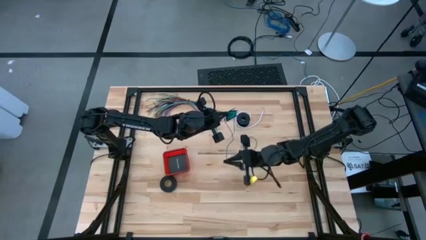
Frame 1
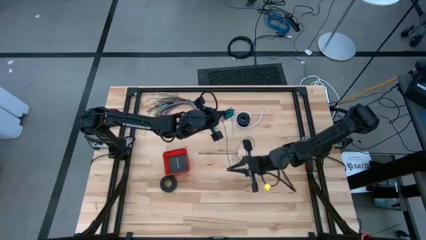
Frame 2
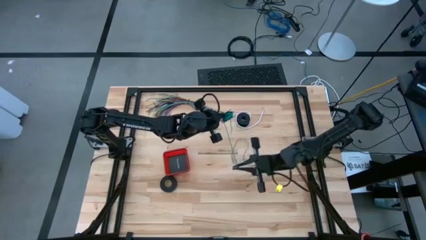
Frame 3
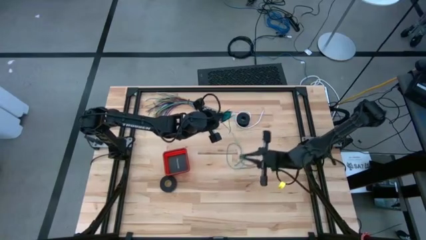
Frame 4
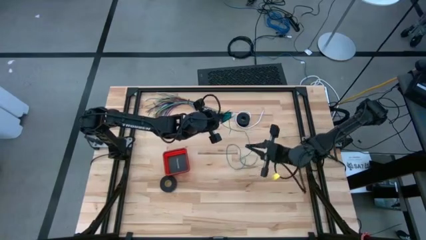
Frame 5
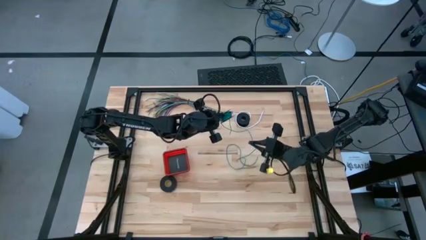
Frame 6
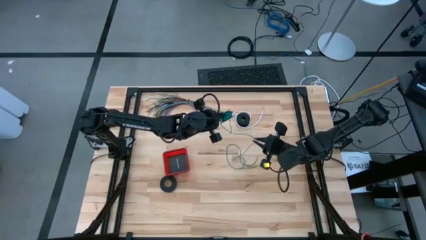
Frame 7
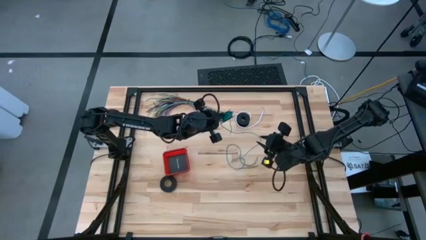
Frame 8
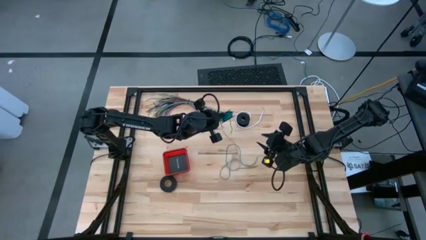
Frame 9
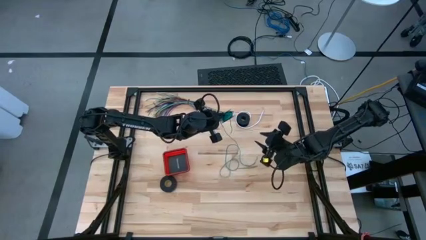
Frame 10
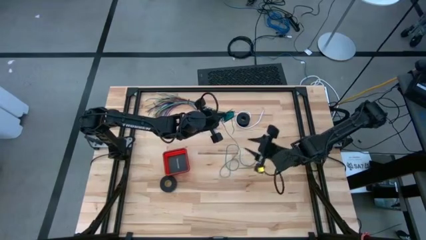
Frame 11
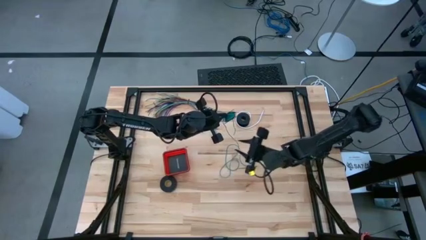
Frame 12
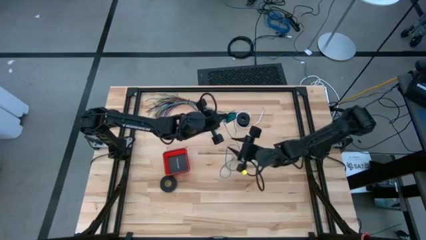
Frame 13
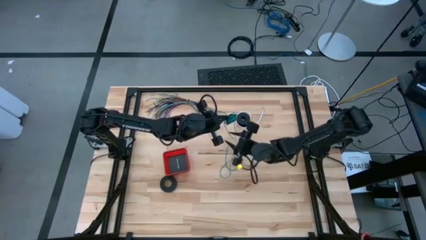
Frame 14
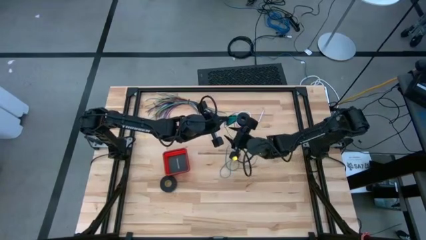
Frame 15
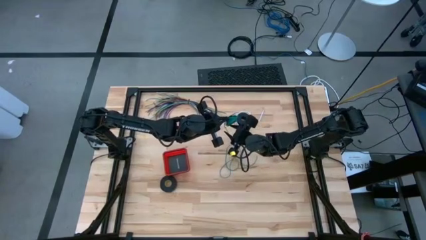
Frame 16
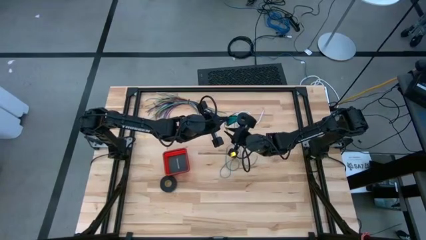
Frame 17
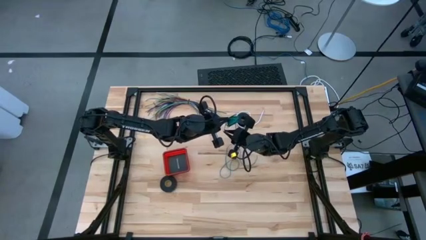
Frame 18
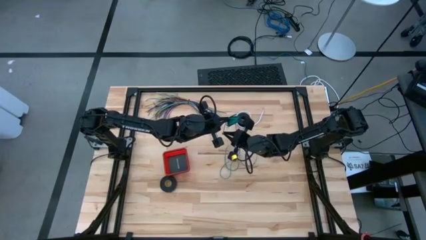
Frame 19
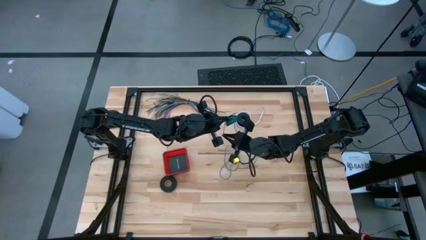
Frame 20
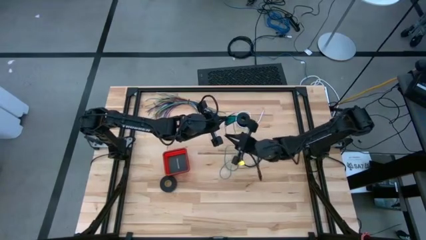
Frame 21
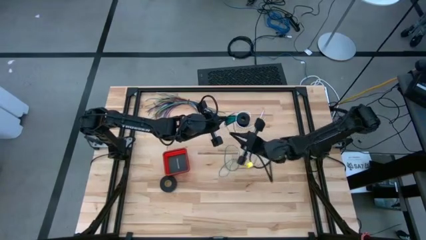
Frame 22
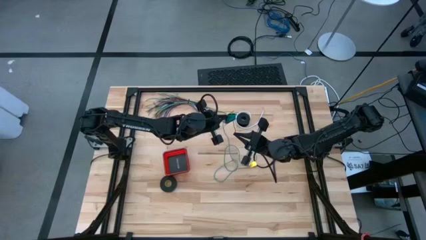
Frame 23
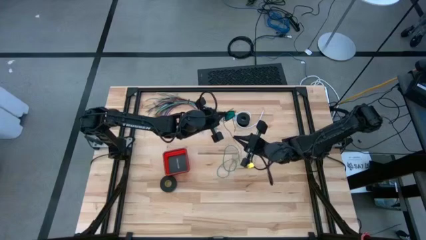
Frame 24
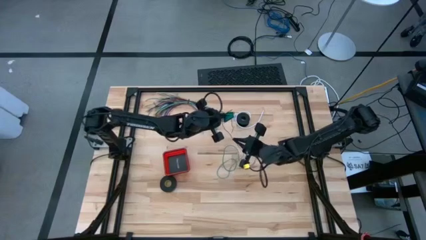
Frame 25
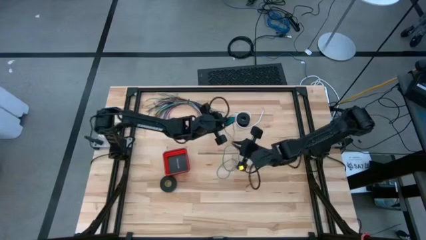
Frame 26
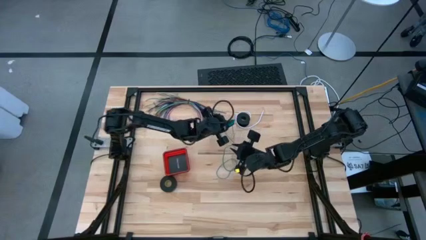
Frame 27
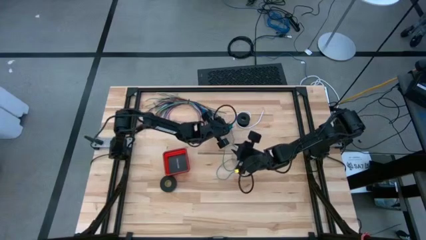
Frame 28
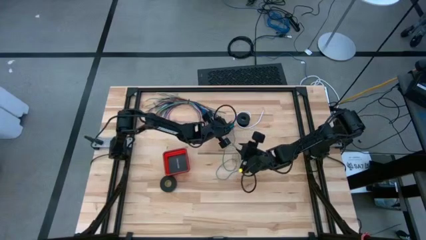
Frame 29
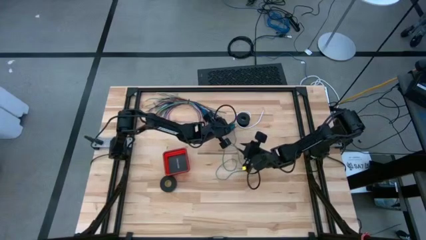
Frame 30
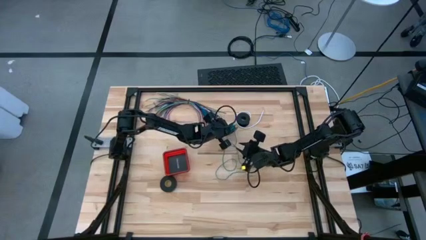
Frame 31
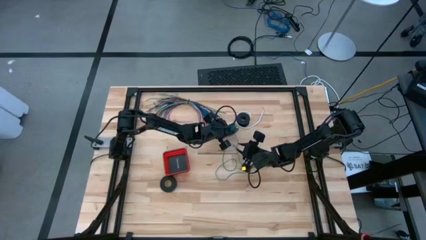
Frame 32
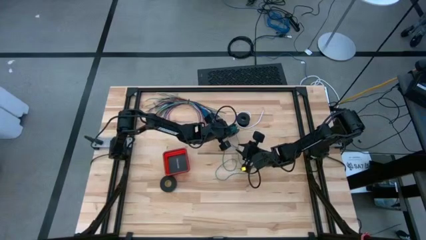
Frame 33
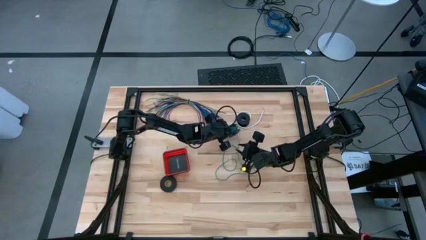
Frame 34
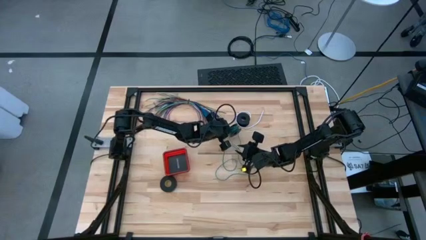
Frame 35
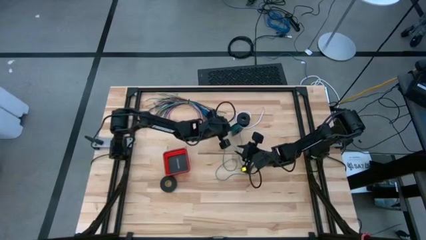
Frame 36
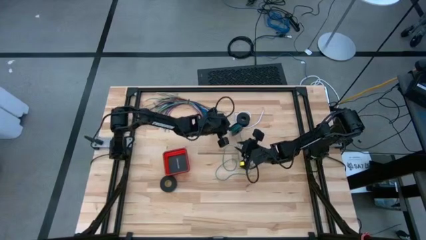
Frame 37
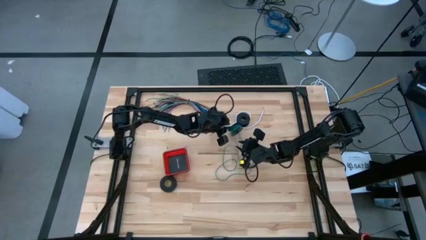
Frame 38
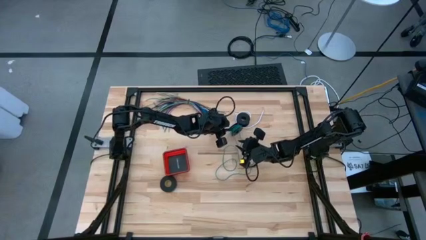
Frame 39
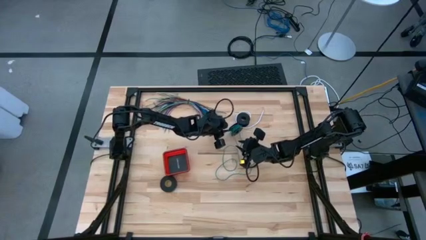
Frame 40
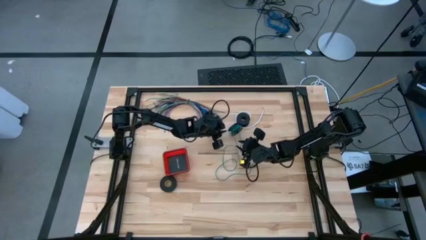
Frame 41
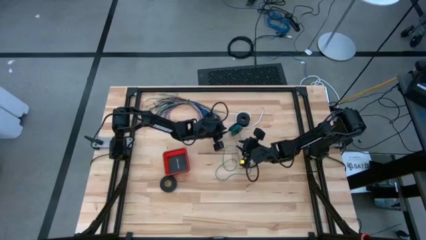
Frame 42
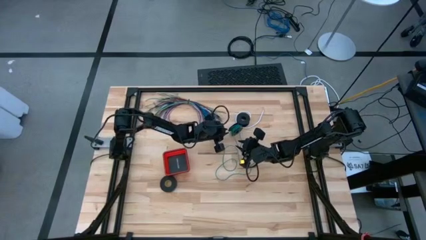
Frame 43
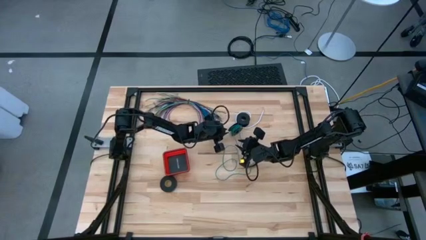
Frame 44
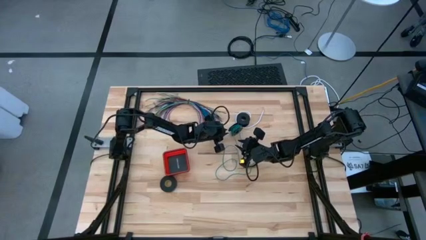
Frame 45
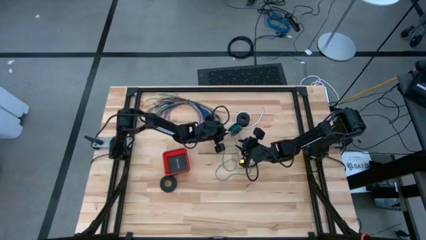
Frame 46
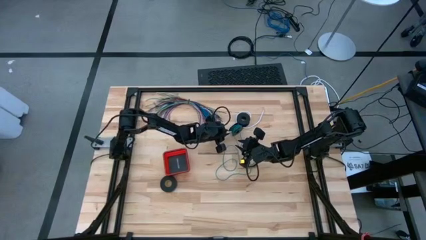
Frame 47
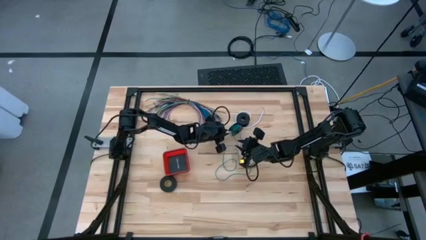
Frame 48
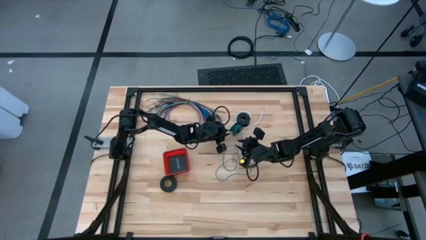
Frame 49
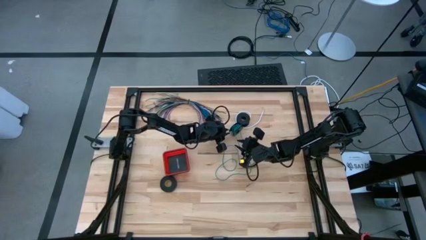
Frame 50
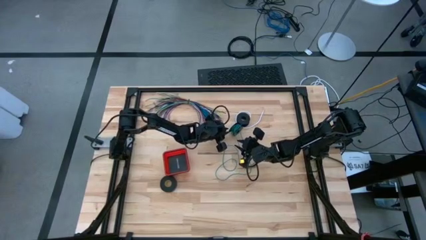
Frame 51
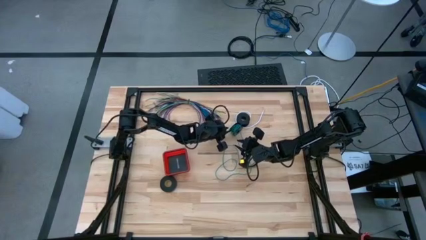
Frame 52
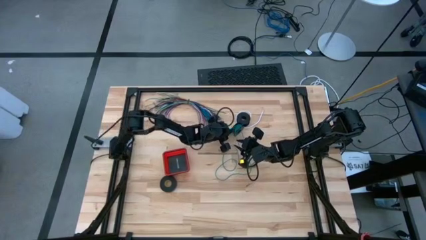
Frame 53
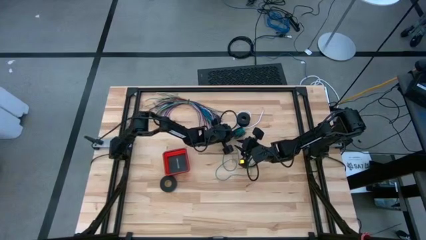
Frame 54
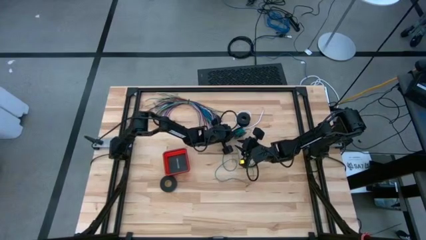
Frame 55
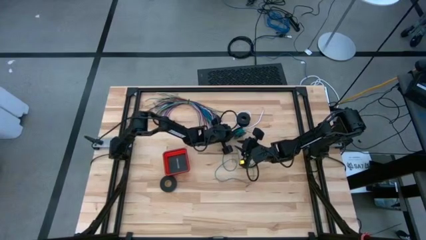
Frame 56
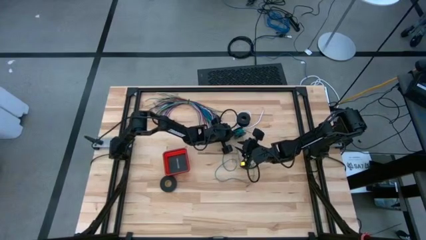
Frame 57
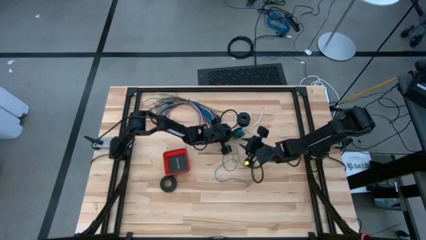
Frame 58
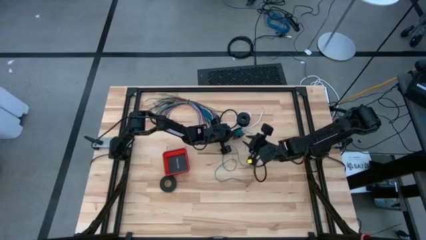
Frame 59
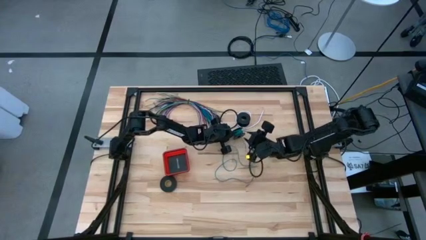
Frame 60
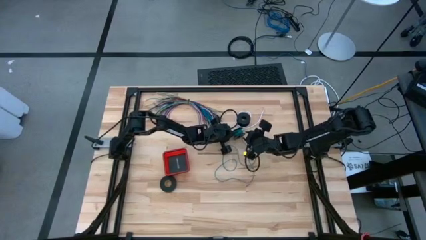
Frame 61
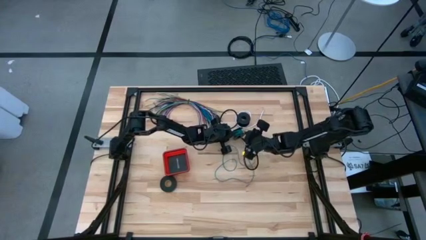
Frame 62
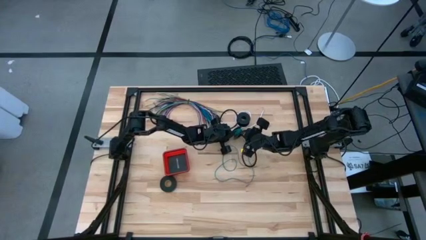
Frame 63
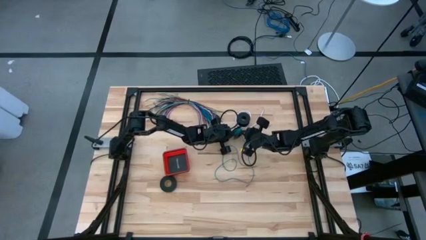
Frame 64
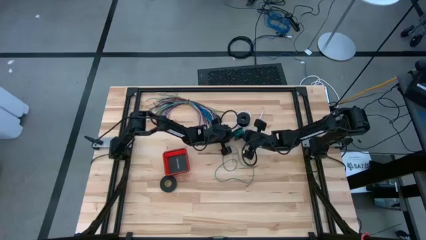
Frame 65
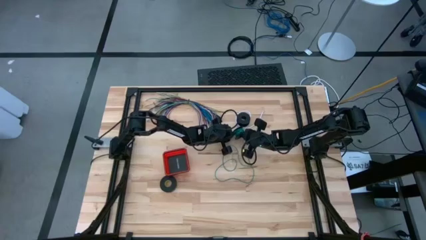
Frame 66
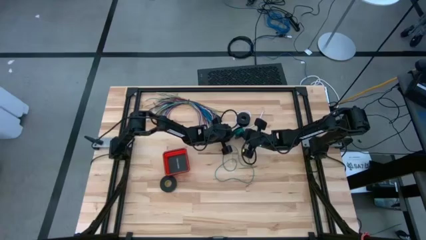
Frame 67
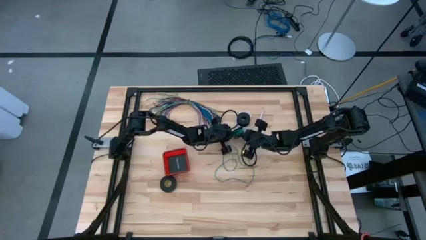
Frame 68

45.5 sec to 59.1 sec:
Task: Coil cords
Uncoil the green wire from the spool
